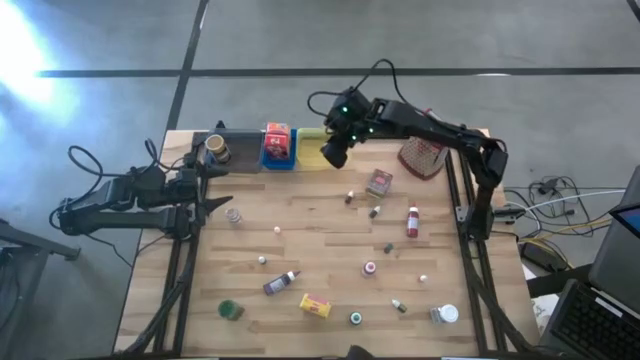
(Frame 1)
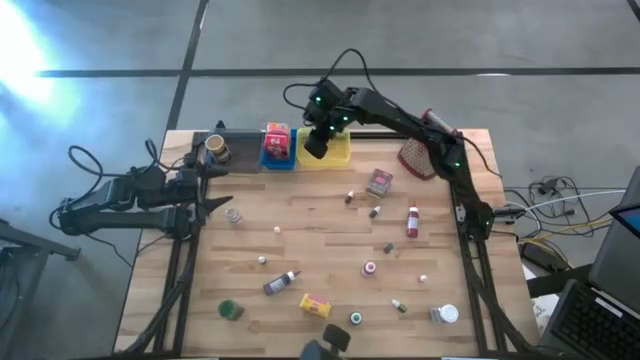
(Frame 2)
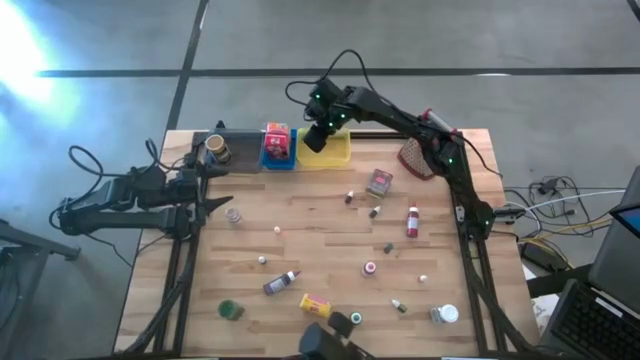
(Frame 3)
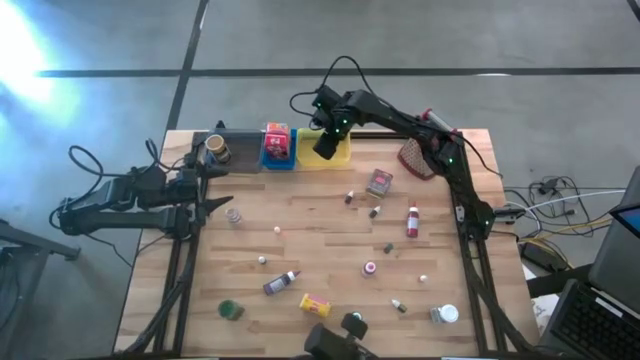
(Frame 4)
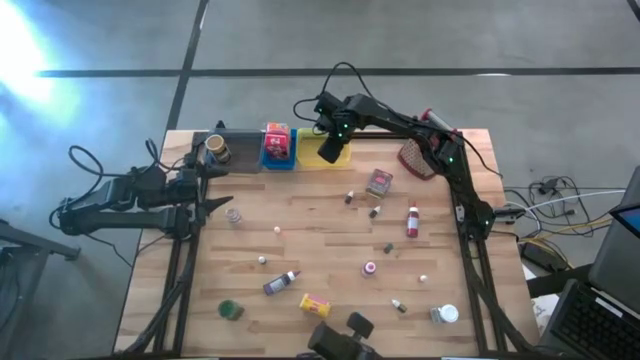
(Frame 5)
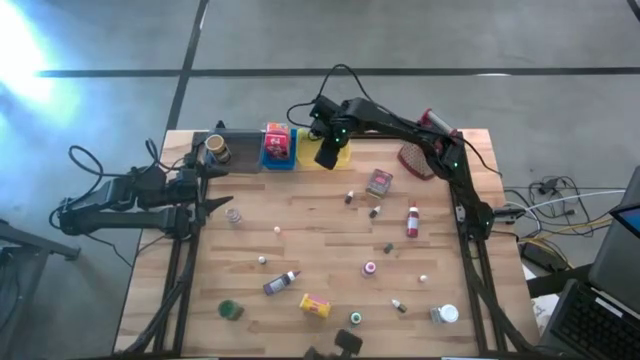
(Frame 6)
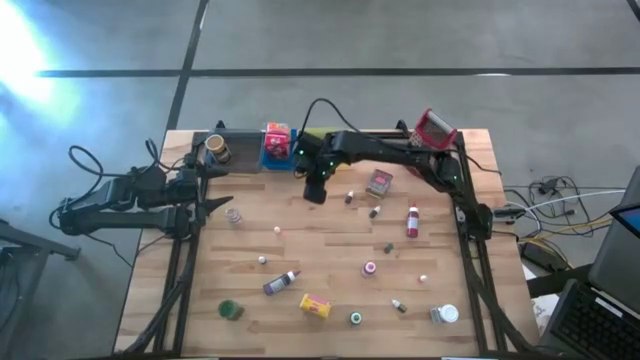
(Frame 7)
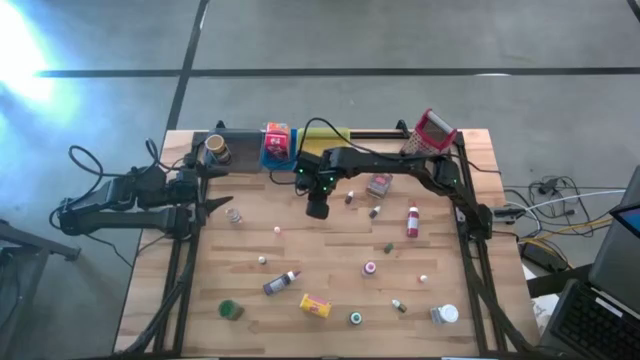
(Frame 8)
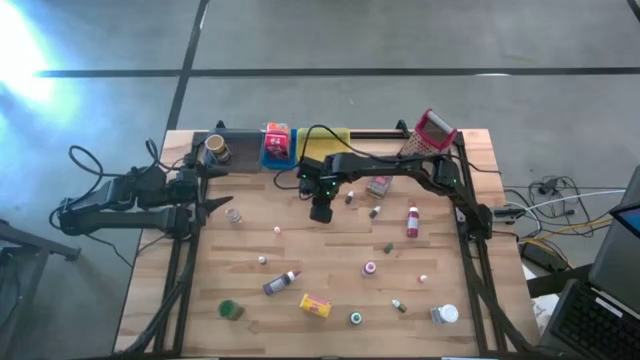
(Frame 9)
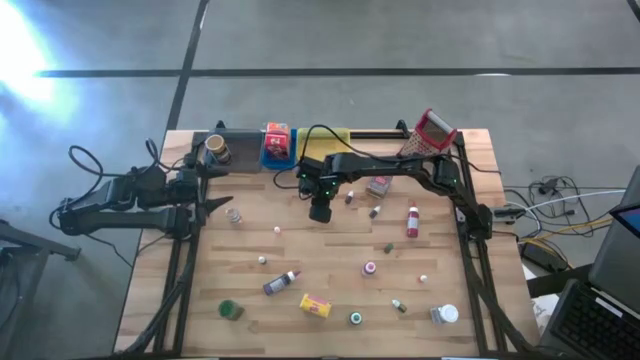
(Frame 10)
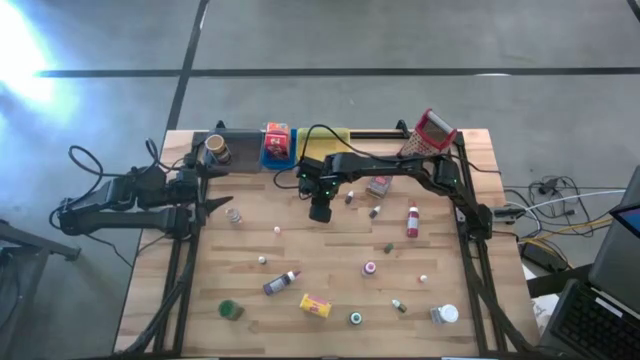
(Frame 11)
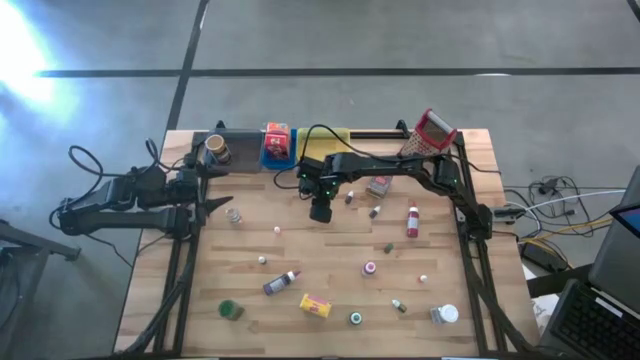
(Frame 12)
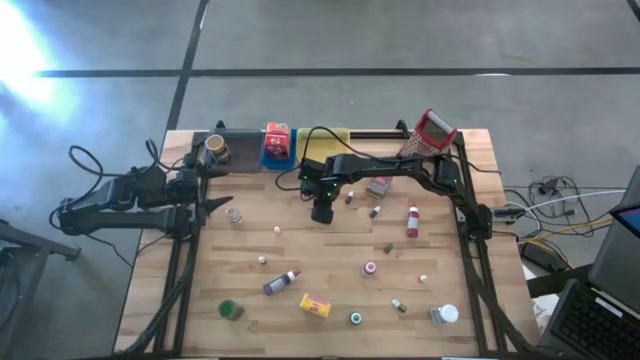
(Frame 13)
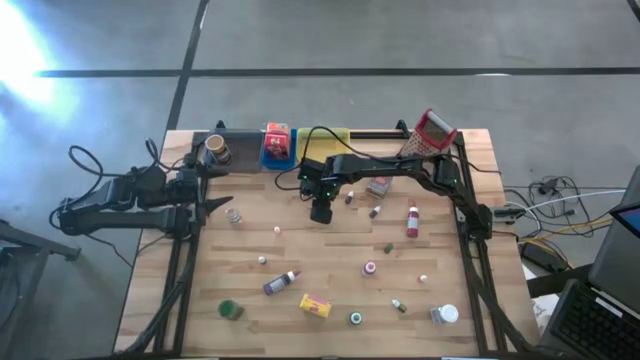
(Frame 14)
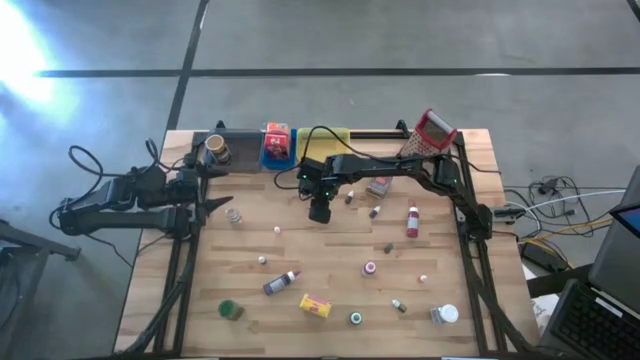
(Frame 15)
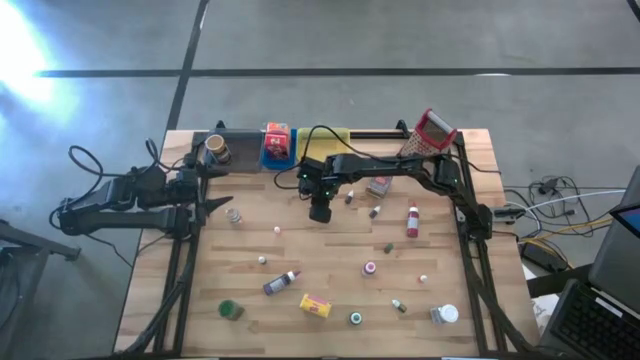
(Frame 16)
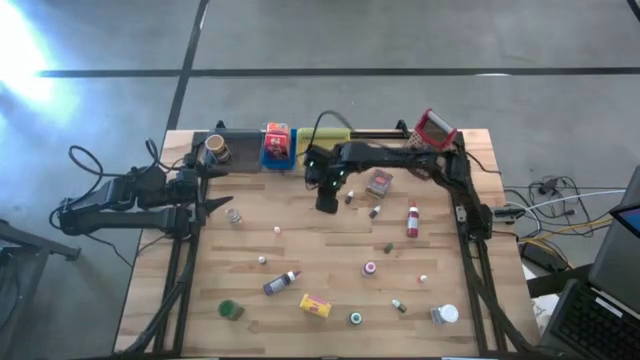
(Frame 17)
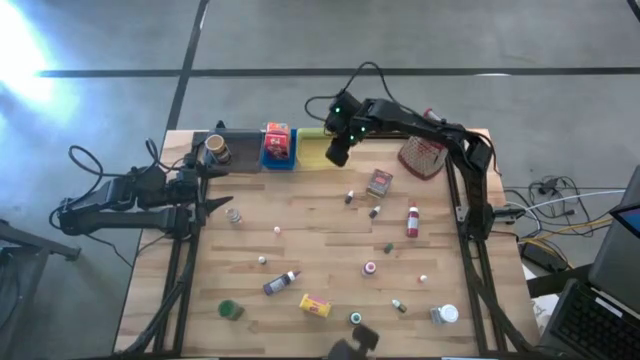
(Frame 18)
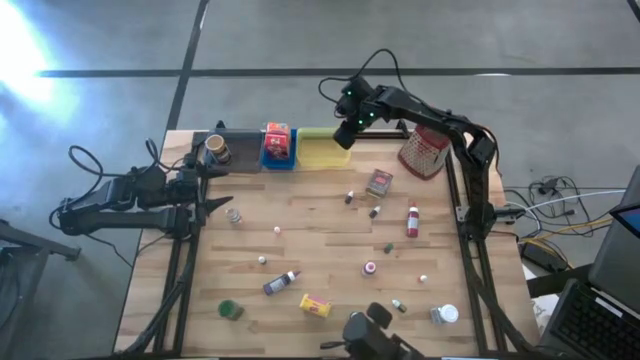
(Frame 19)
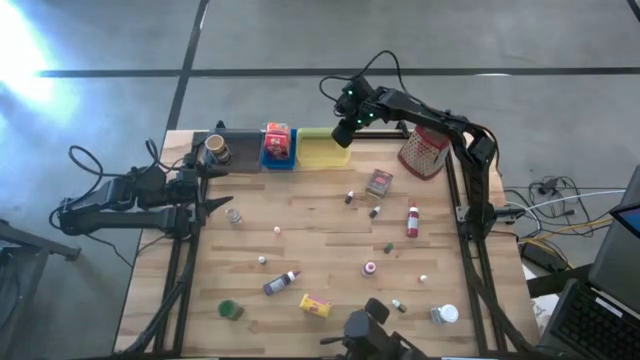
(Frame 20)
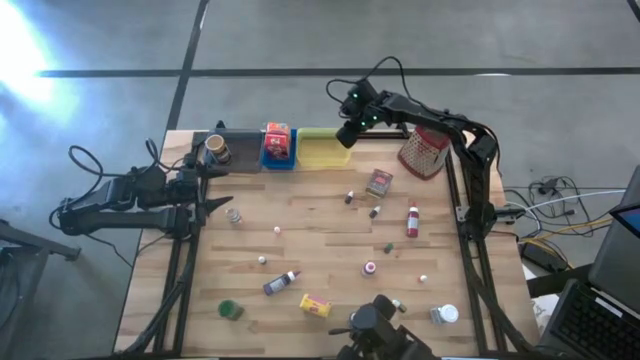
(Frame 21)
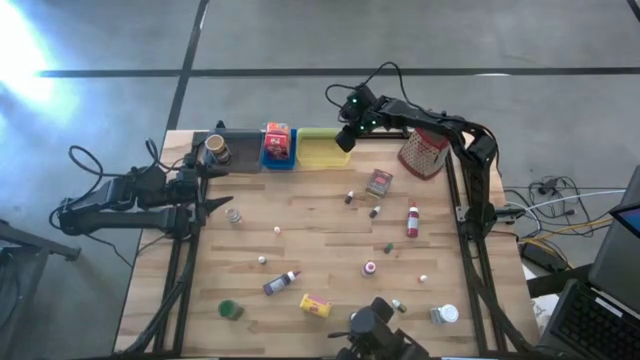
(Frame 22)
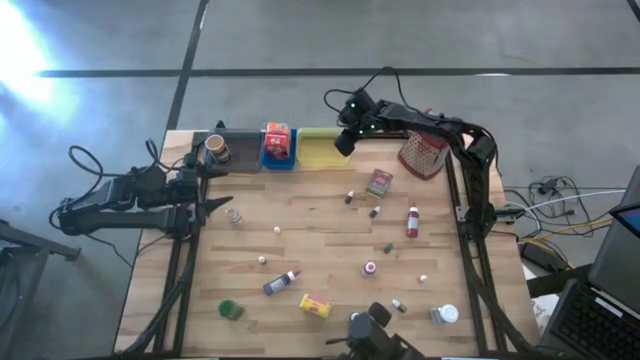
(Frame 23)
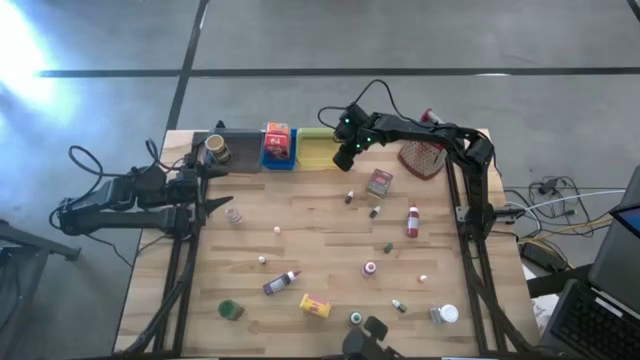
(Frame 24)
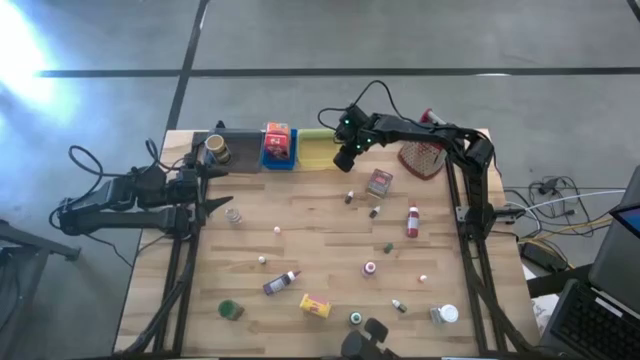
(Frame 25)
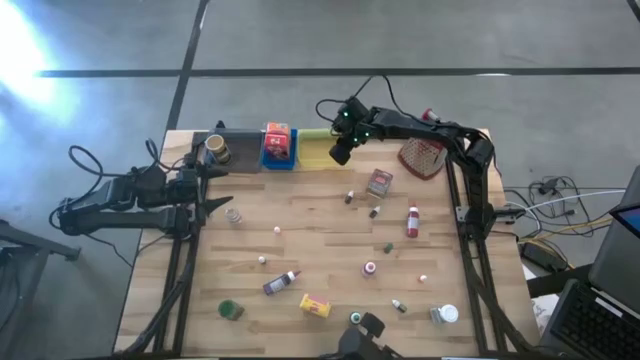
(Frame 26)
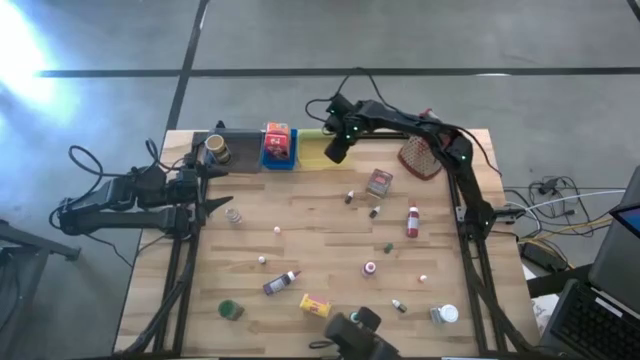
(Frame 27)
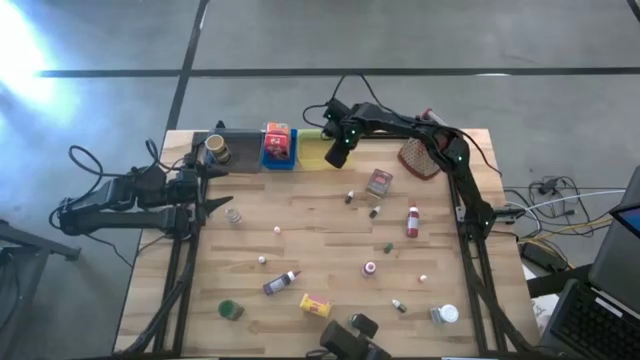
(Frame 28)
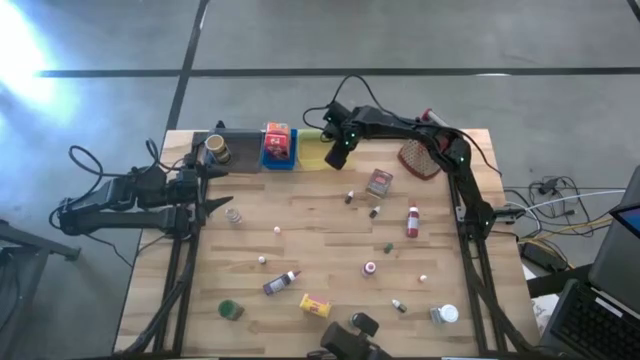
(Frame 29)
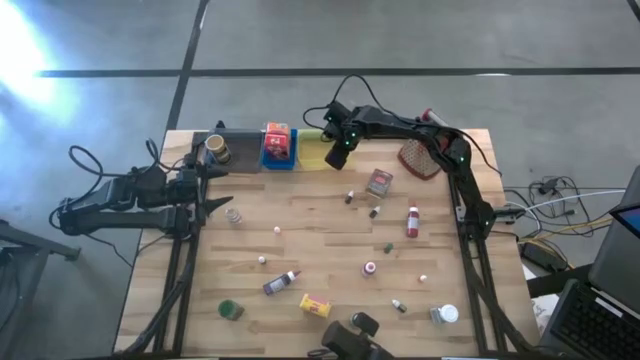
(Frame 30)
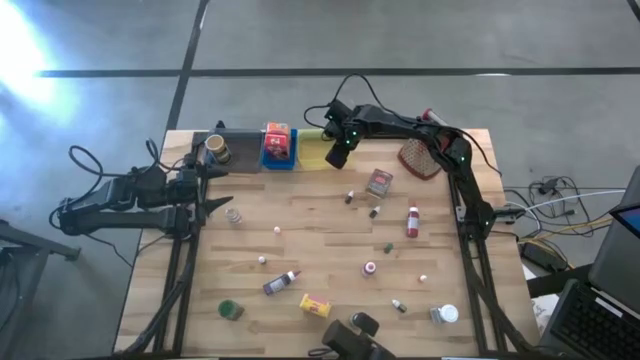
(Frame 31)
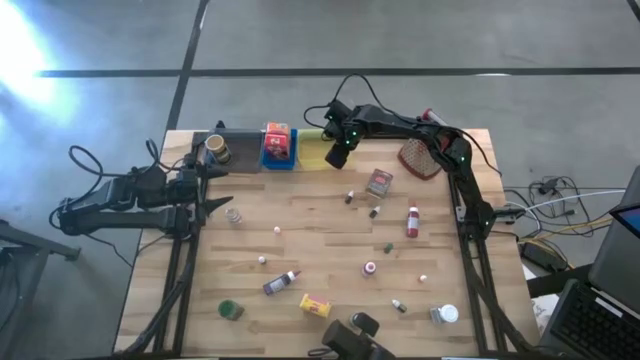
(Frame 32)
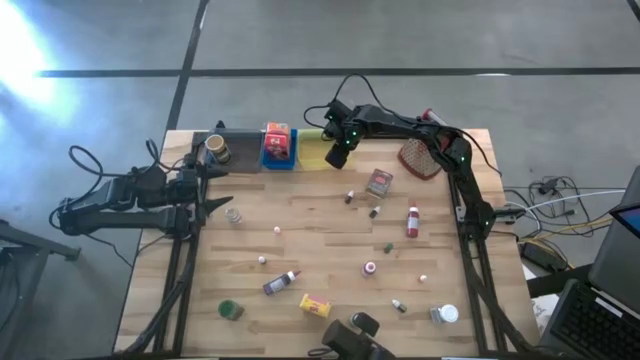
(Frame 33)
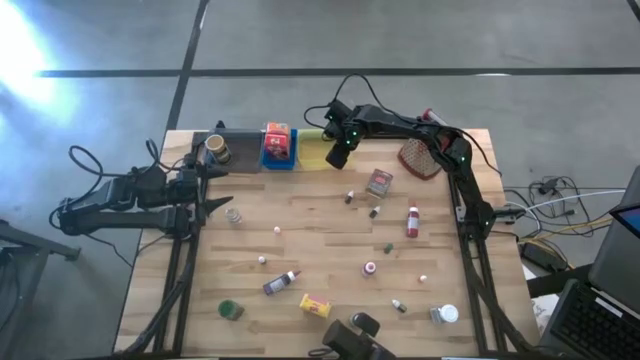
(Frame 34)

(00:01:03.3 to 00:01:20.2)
Task: Pick & Place Kitchen Items
Put the black food coloring bottle into the yellow bin

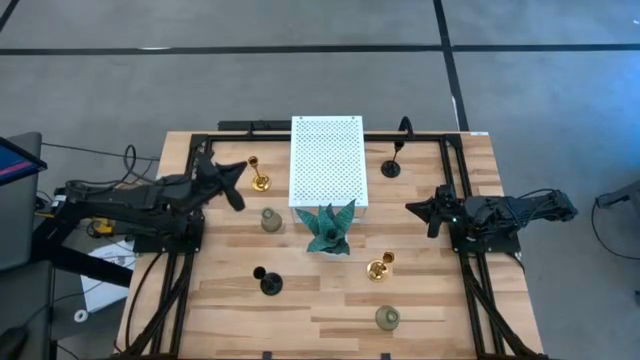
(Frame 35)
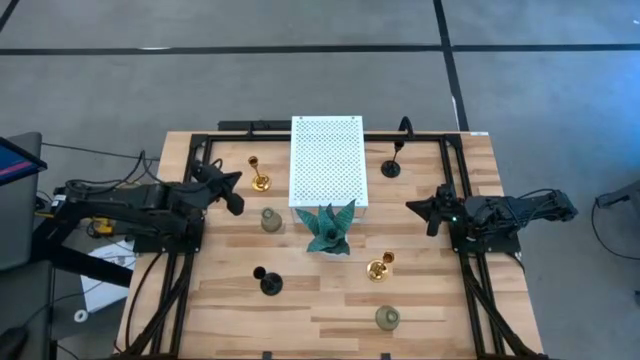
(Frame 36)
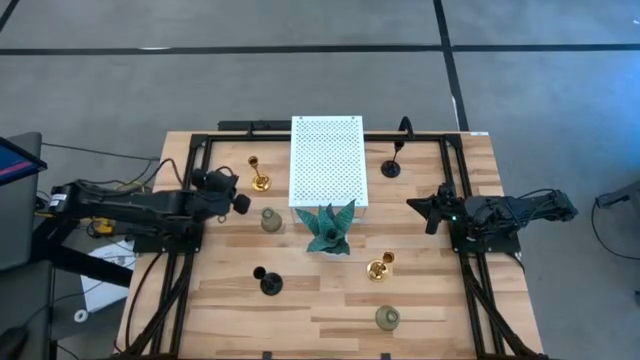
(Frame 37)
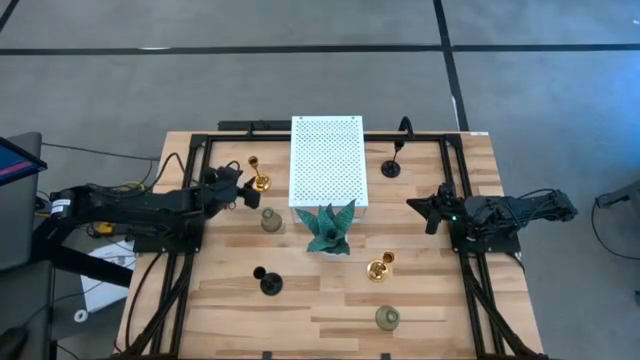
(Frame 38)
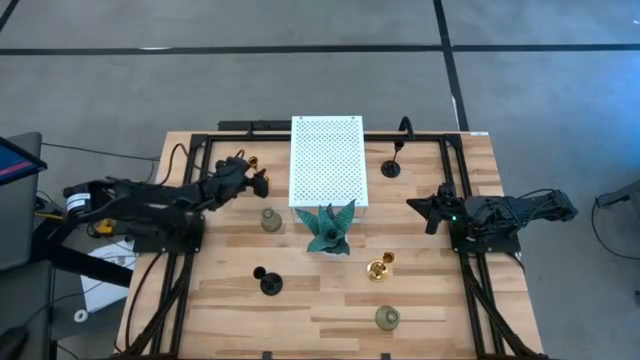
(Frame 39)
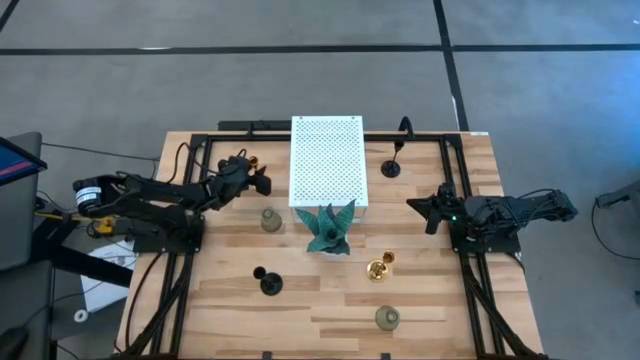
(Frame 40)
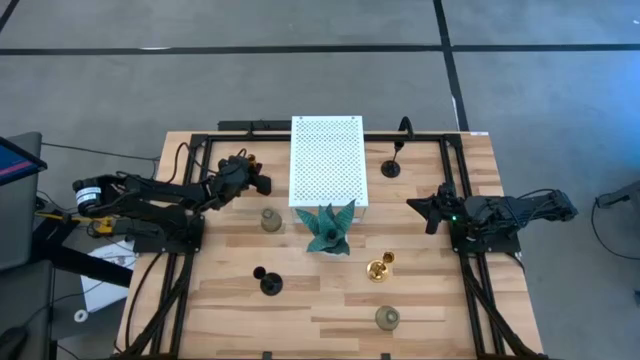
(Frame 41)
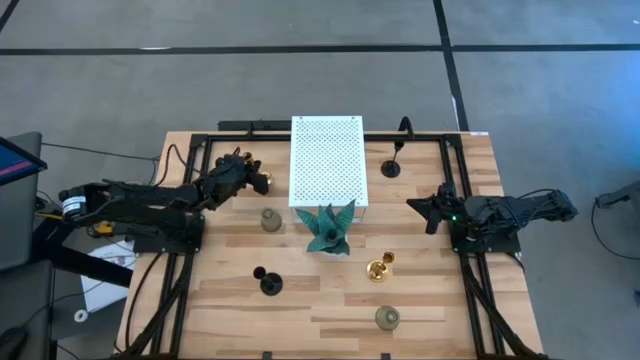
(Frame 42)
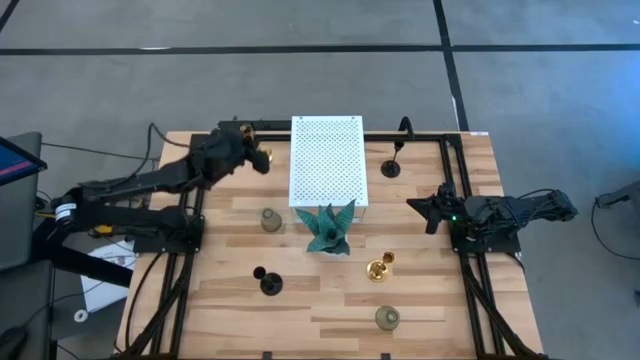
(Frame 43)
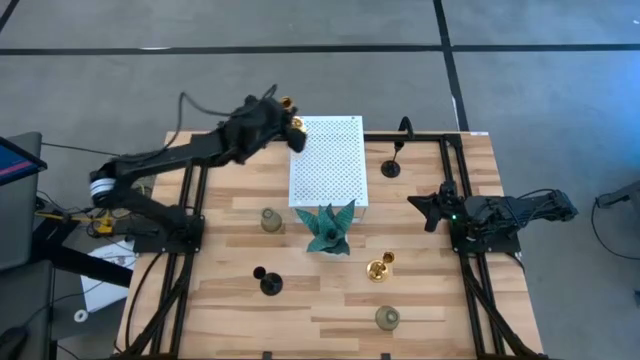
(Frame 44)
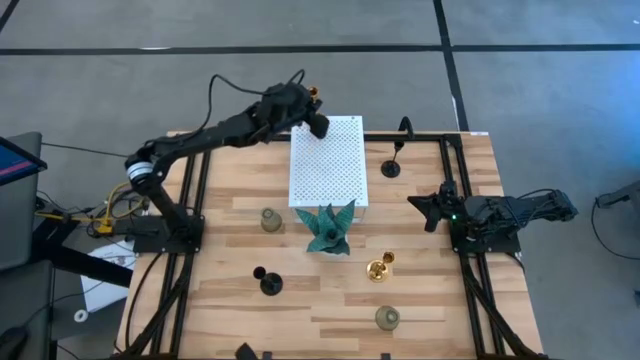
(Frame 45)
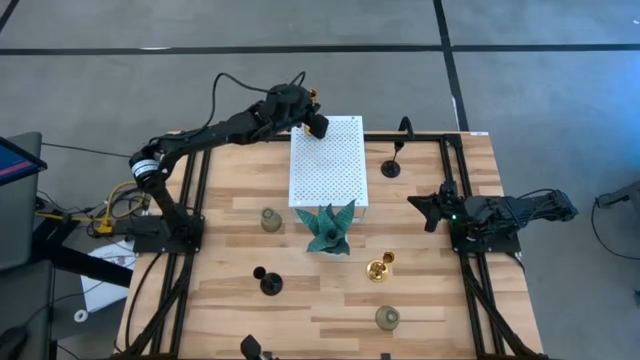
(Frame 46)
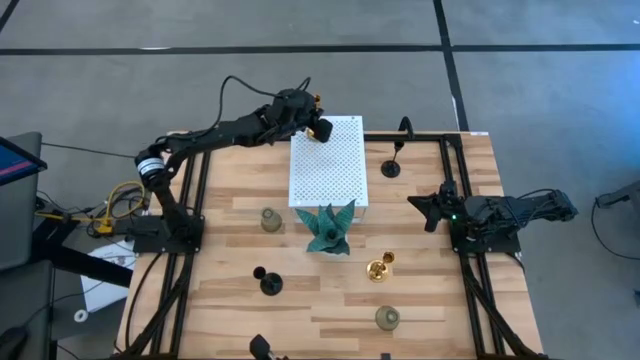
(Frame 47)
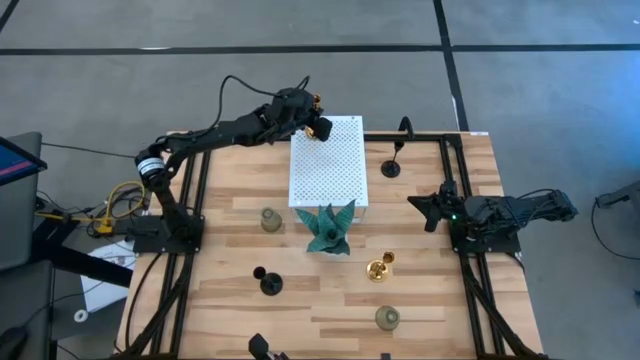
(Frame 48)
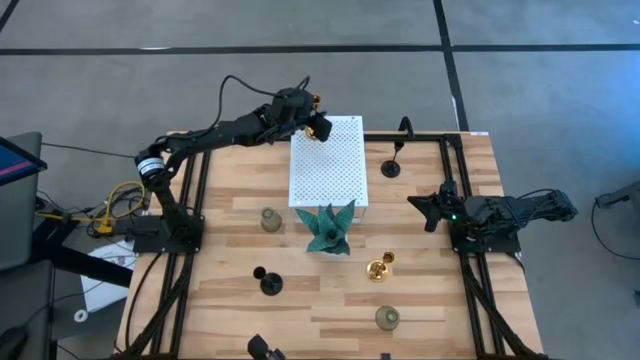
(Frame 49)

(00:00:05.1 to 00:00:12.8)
Task: Pick & Place candle stick holders
Put the top gold candle holder on the shelf
